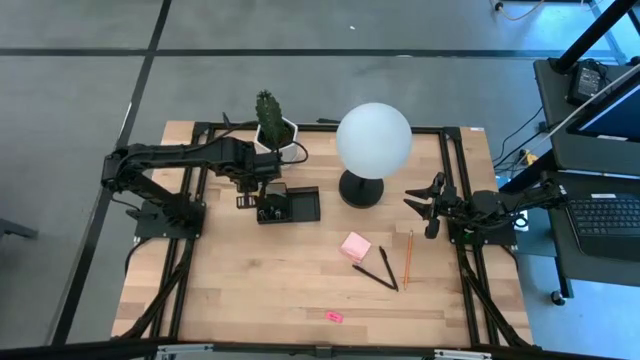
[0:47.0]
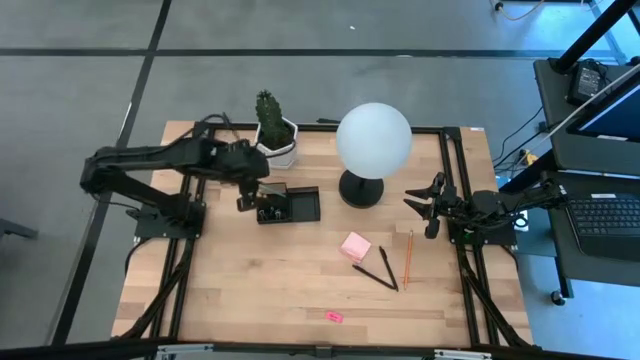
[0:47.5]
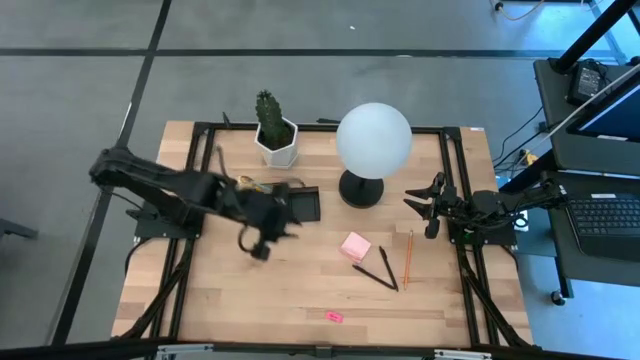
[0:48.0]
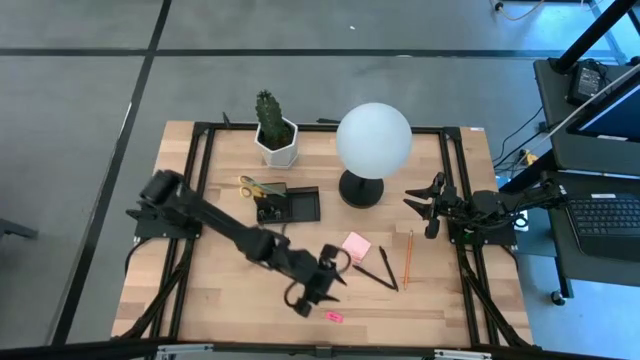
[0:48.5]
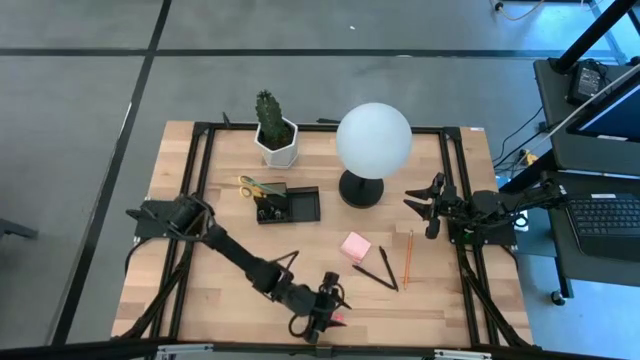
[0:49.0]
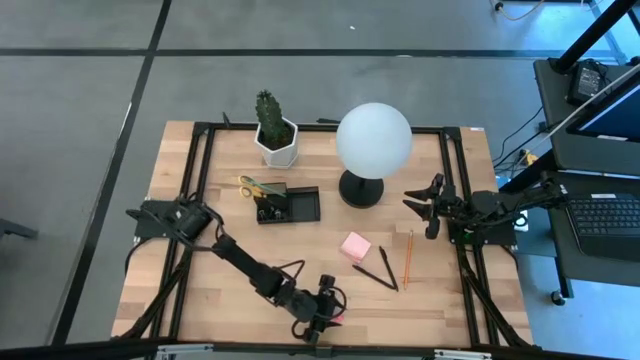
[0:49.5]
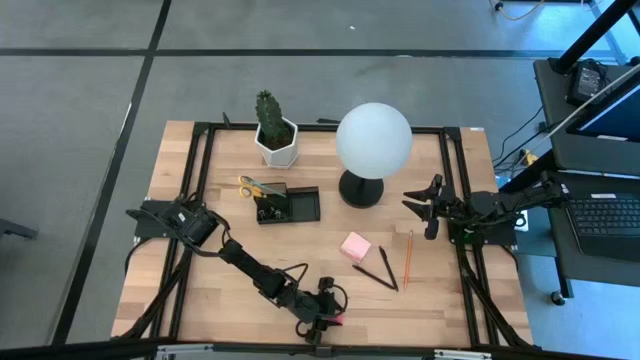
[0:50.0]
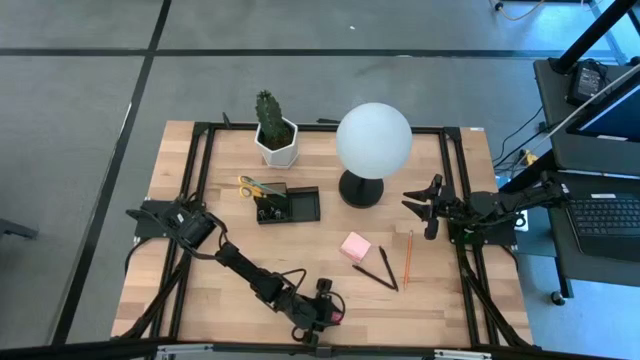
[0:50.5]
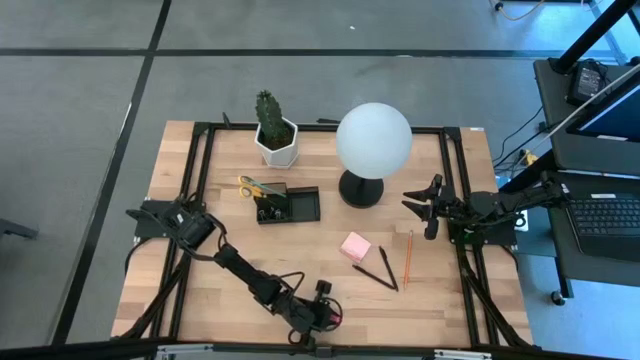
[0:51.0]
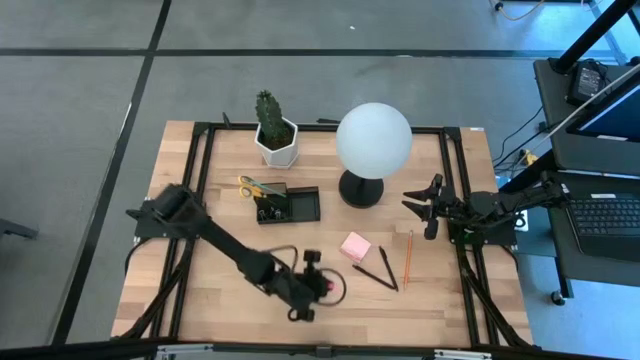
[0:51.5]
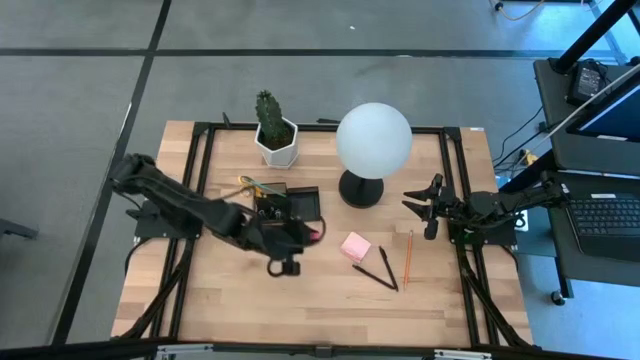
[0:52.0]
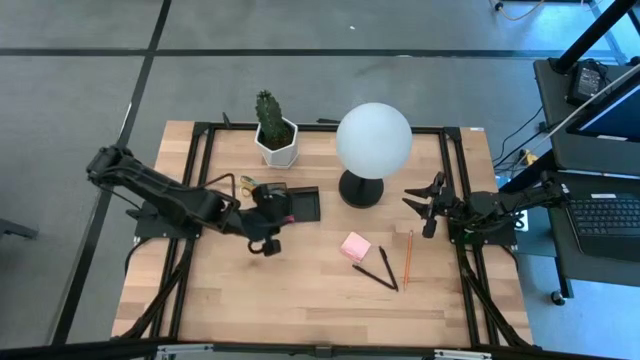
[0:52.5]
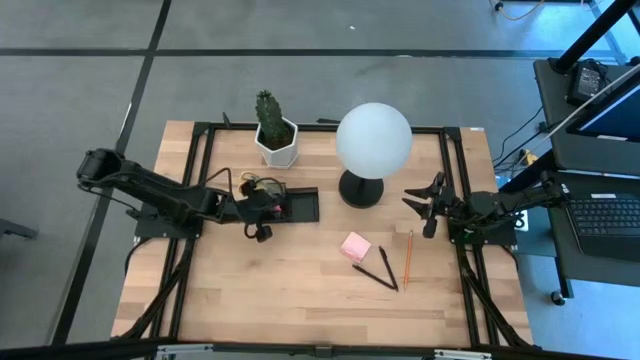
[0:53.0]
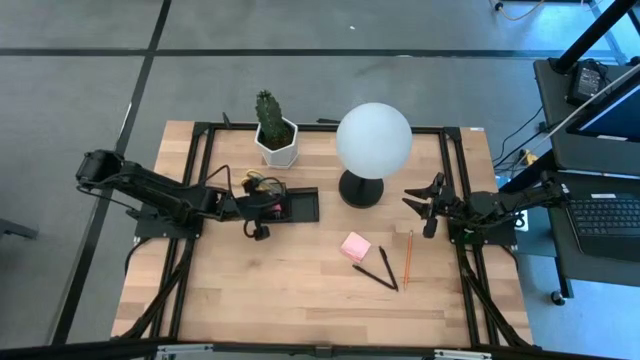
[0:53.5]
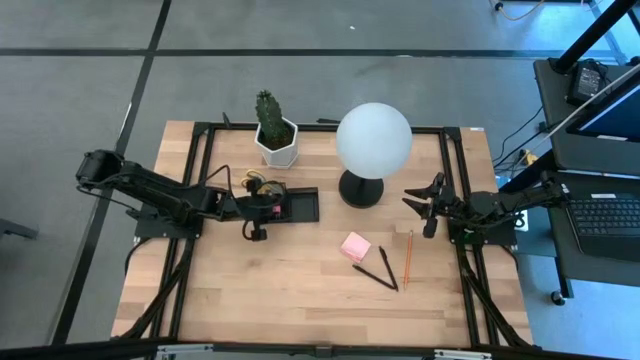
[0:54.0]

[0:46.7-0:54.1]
Task: Pick and place office supplies into organizer
Put the pink eraser into the black desk organizer

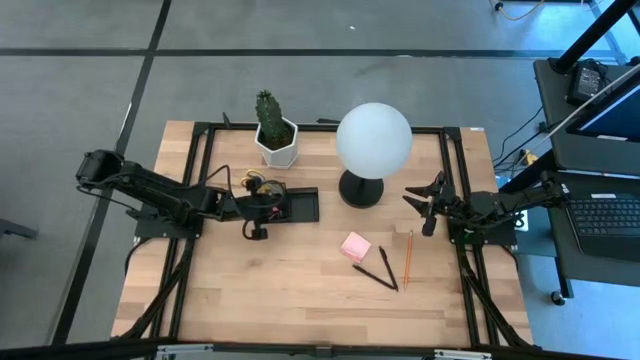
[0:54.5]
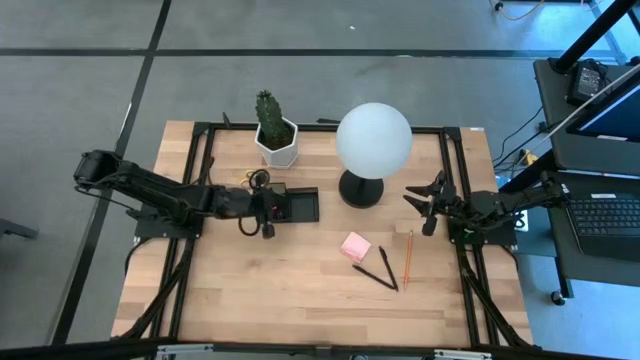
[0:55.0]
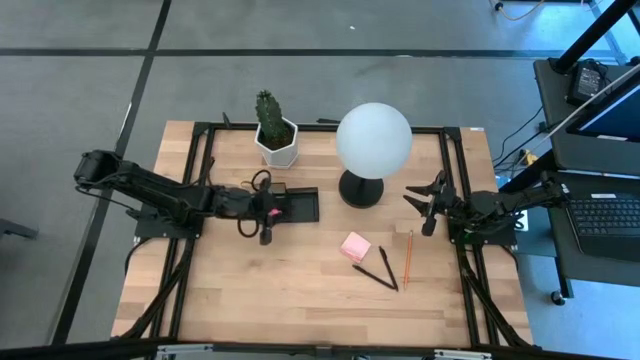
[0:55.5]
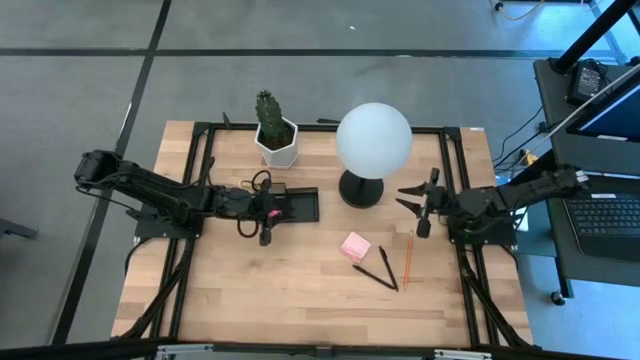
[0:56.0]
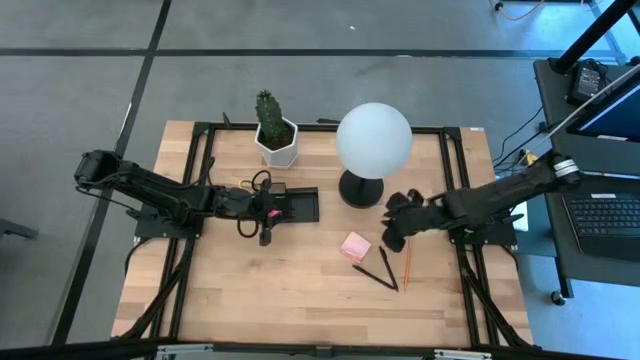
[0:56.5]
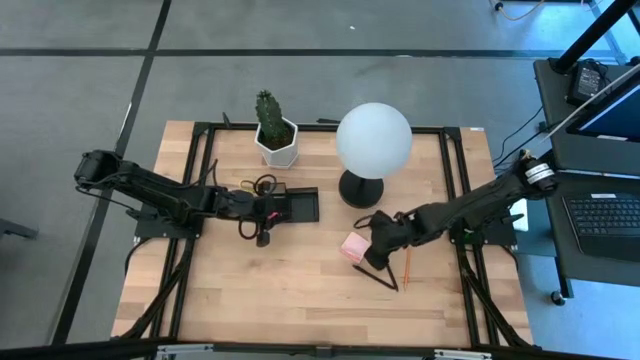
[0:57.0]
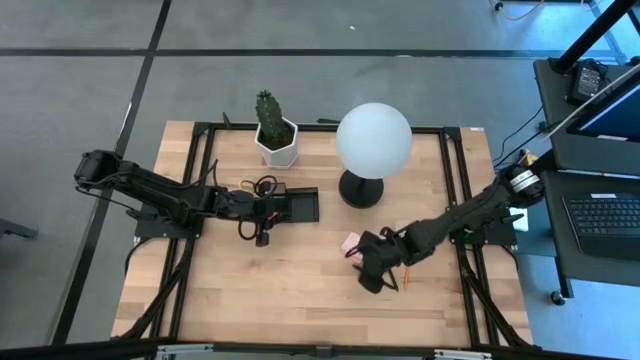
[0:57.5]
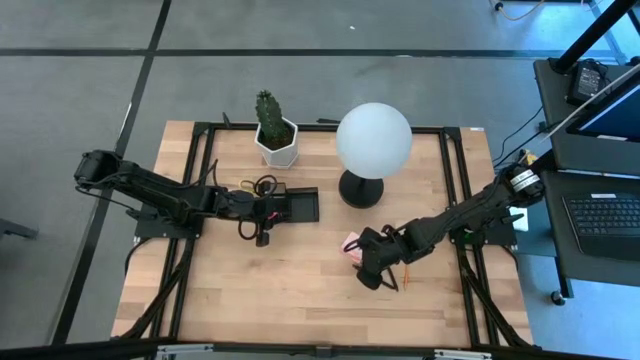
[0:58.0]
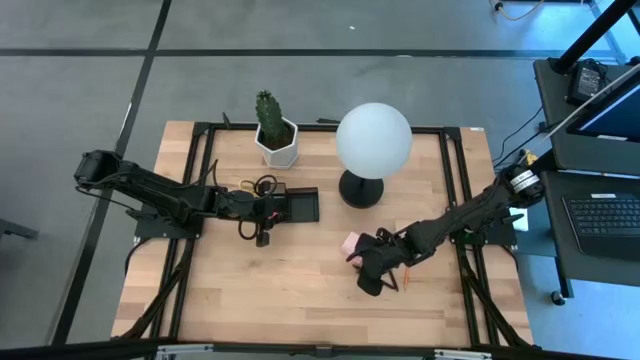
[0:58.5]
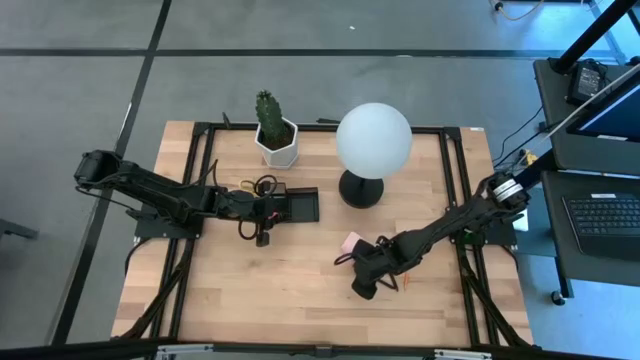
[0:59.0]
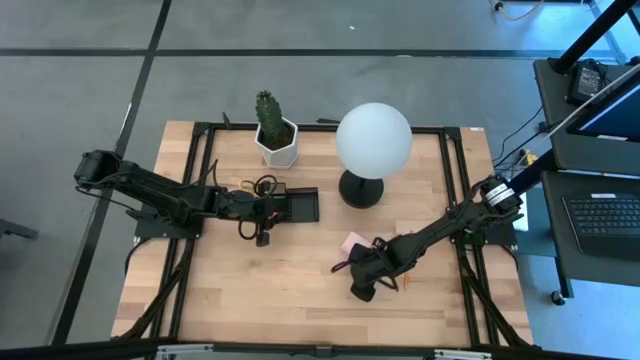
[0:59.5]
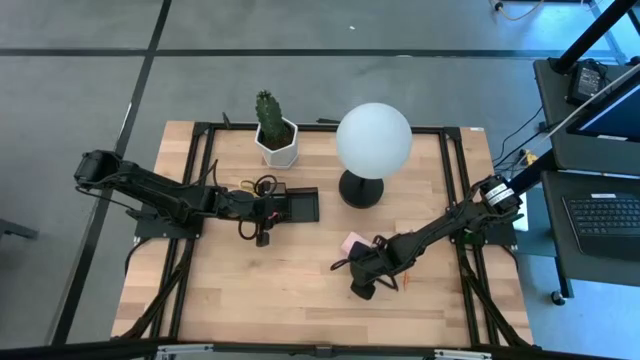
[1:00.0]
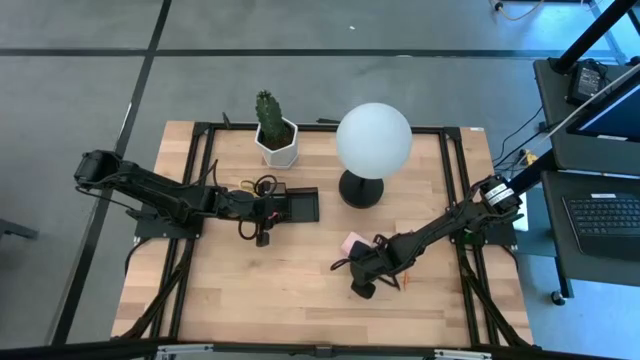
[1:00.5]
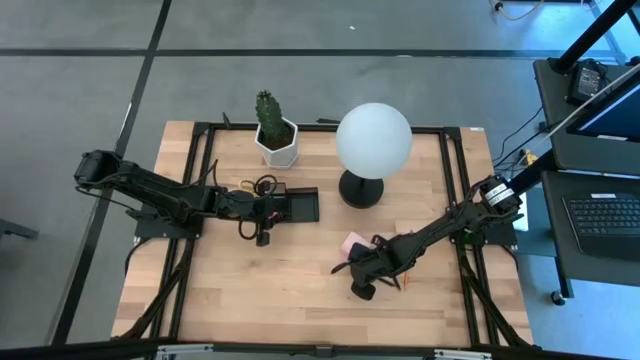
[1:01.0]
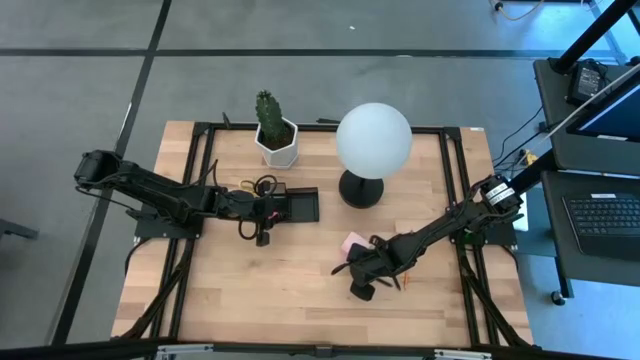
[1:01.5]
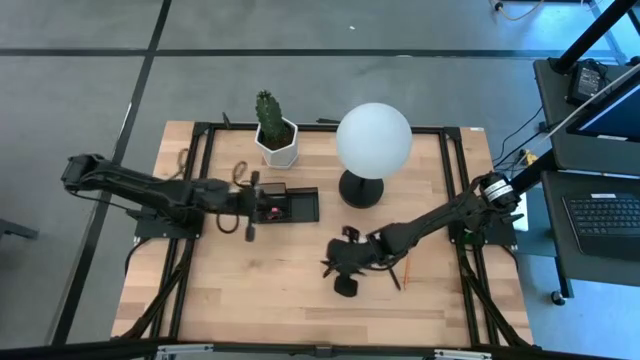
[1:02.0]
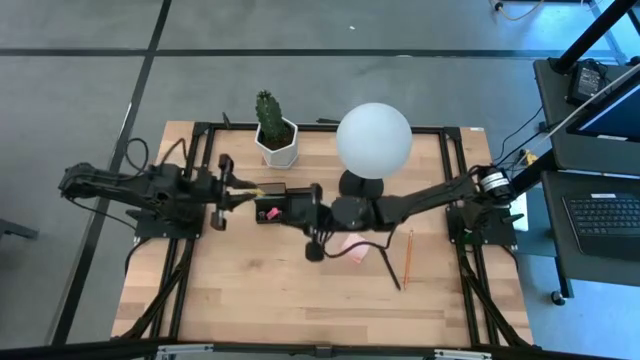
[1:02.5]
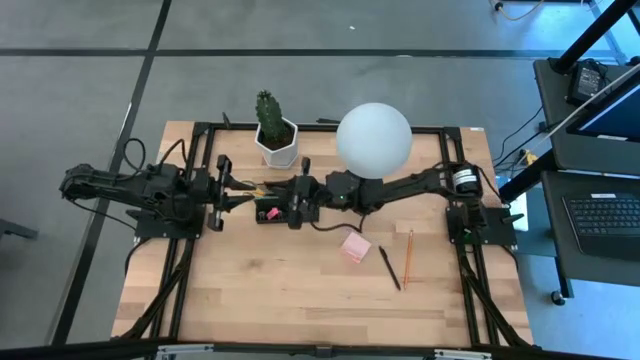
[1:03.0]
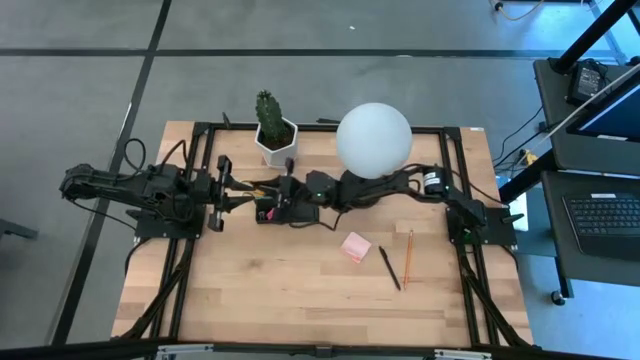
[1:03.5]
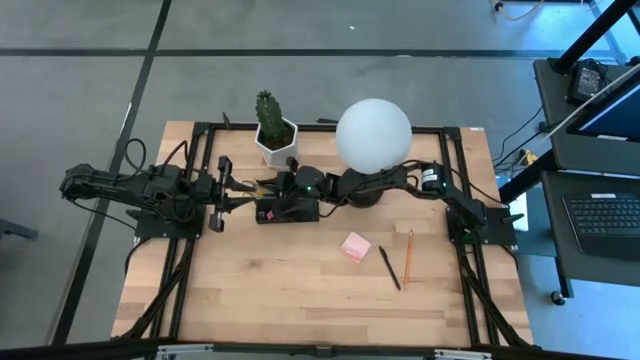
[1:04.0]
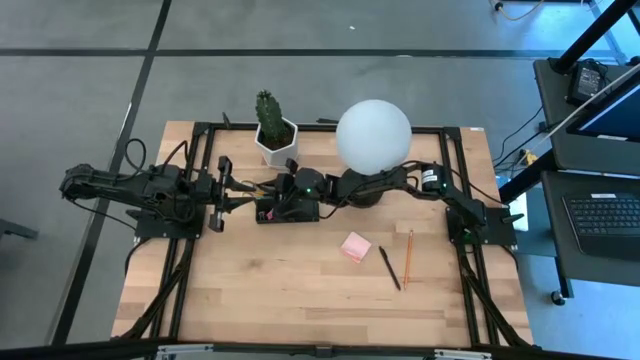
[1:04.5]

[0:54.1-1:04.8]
Put the left black pen into the black desk organizer

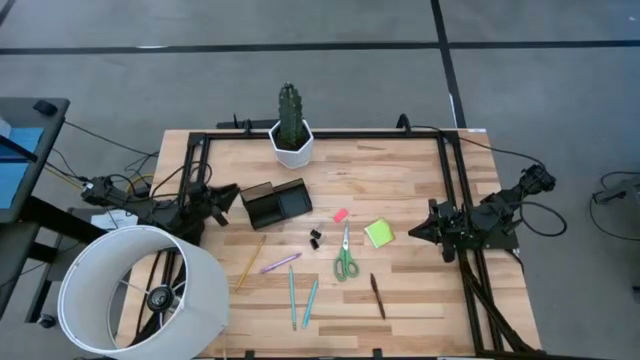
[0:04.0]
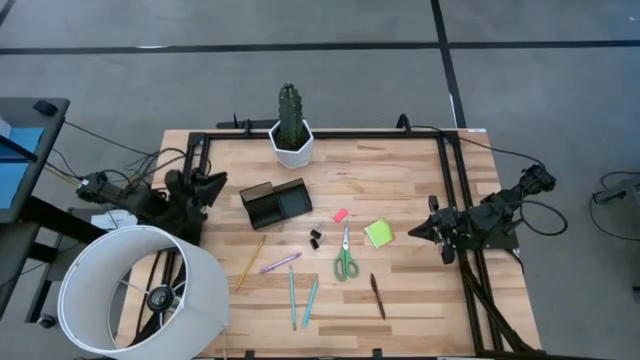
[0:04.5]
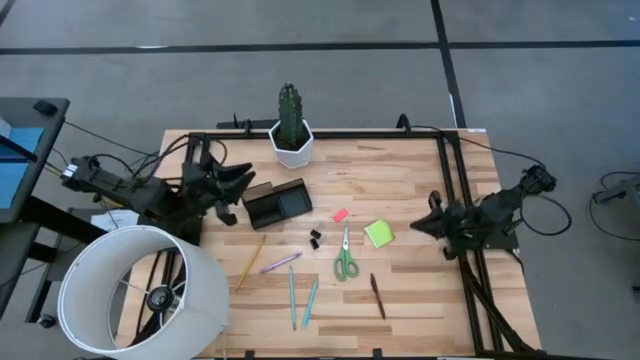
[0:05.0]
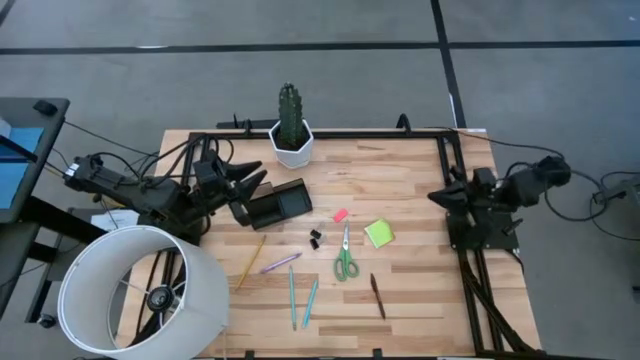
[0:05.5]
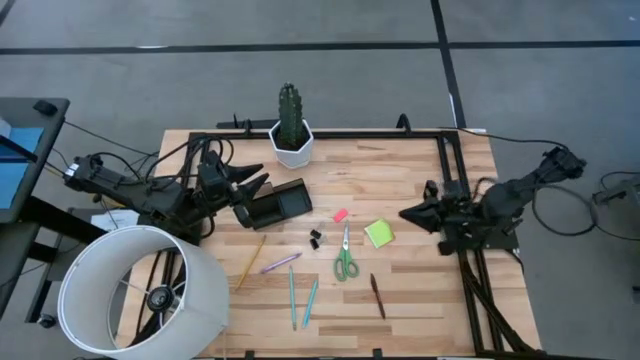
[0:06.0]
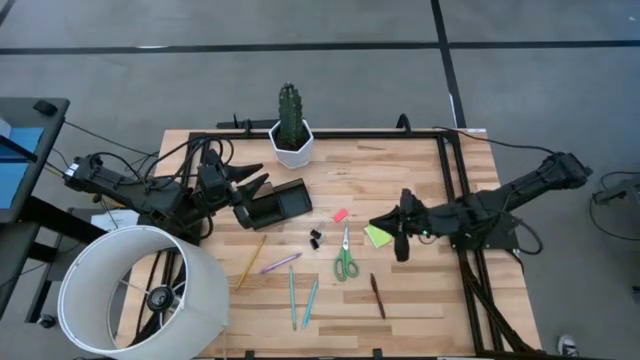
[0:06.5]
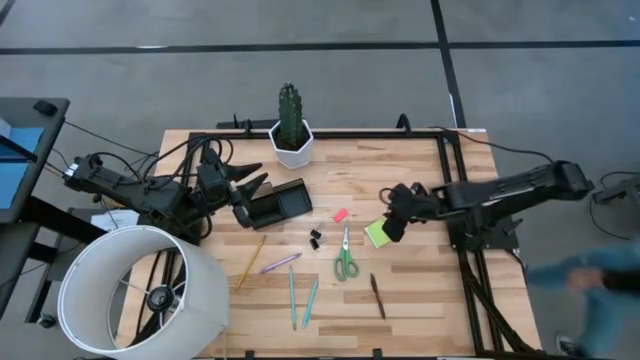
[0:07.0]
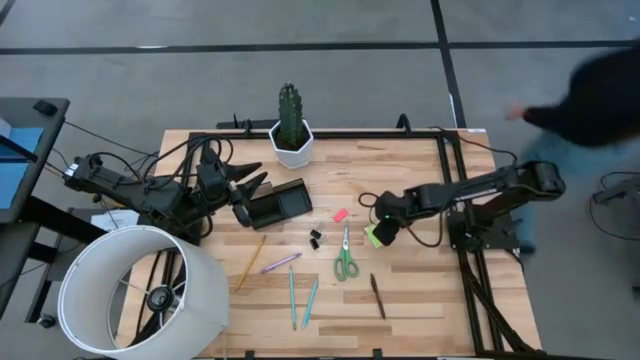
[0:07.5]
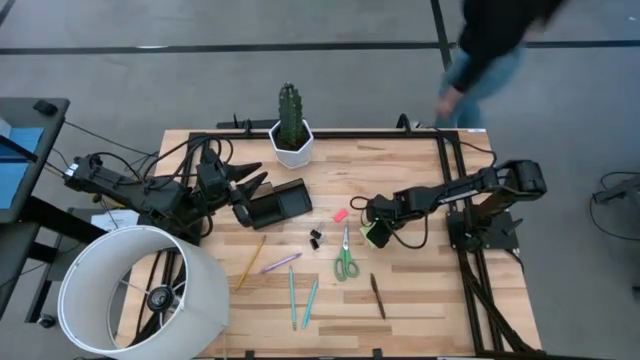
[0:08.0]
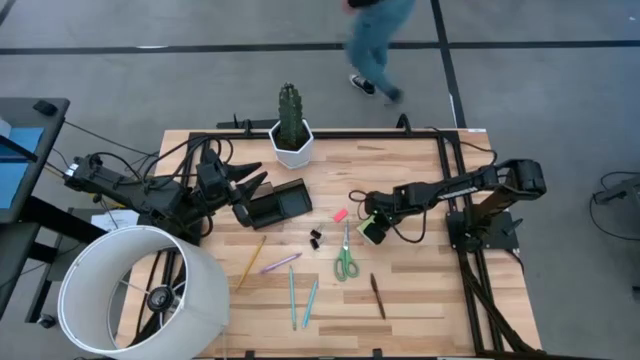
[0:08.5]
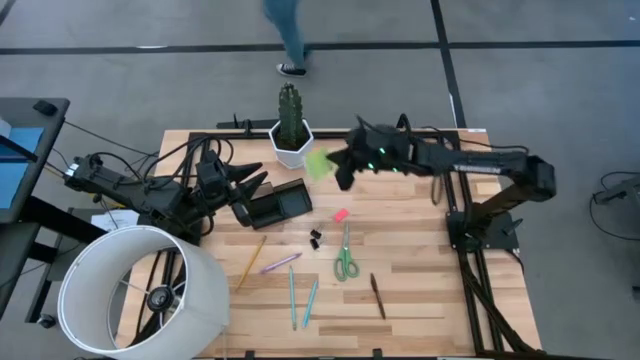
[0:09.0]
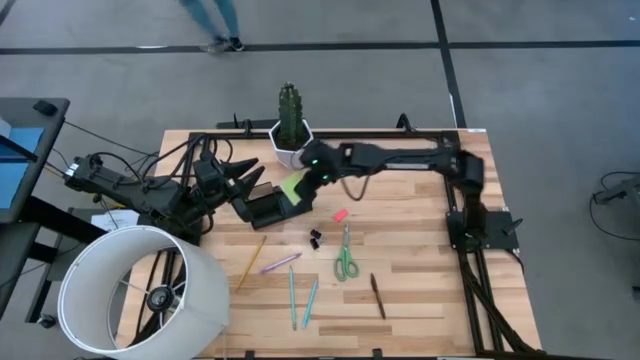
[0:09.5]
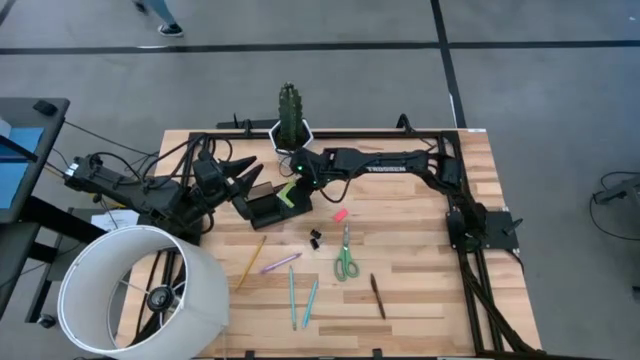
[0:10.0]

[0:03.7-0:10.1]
Task: Pick and place office supplies into organizer
Put the green sticky notes into the black mesh organizer
